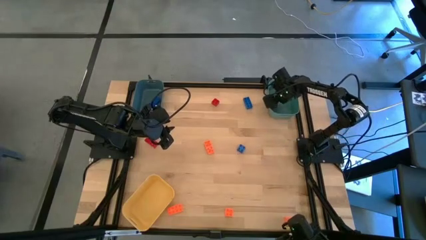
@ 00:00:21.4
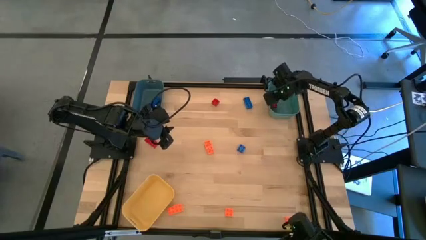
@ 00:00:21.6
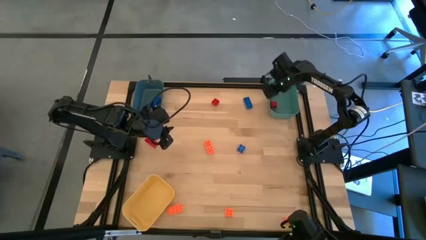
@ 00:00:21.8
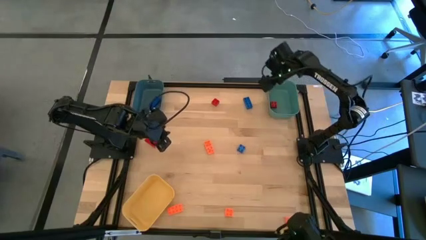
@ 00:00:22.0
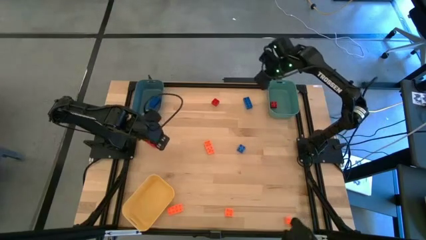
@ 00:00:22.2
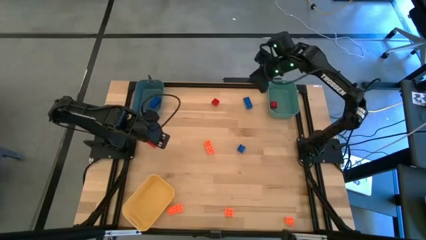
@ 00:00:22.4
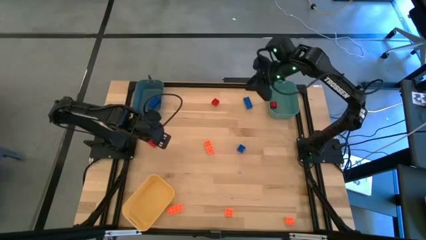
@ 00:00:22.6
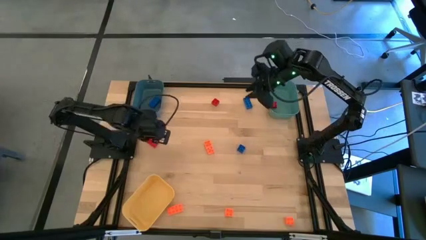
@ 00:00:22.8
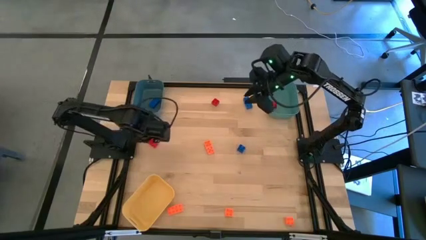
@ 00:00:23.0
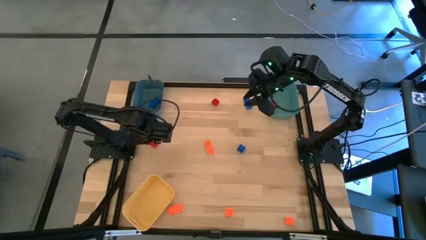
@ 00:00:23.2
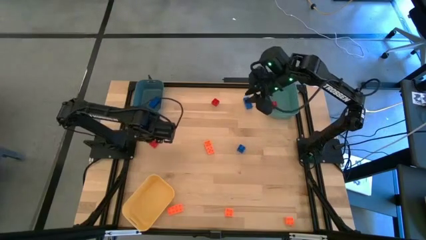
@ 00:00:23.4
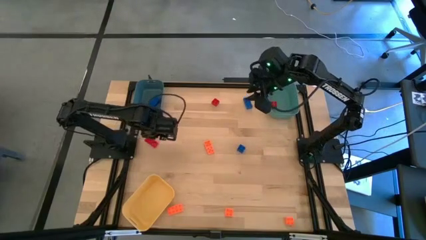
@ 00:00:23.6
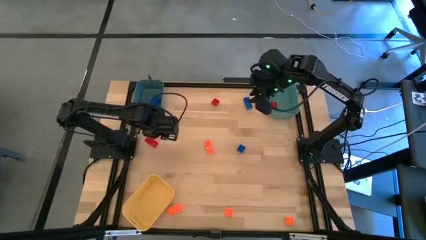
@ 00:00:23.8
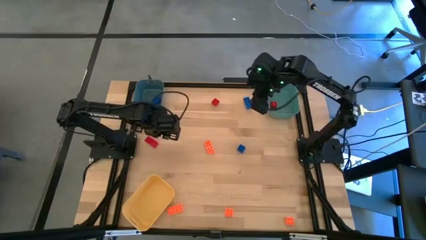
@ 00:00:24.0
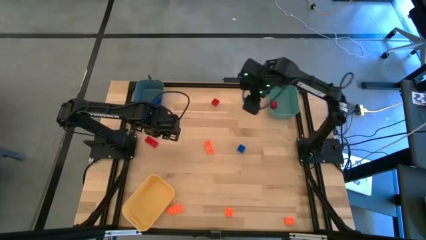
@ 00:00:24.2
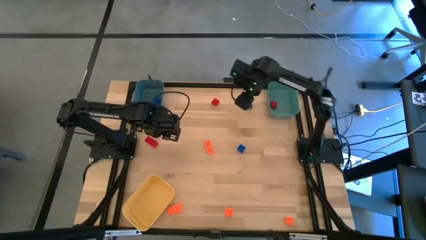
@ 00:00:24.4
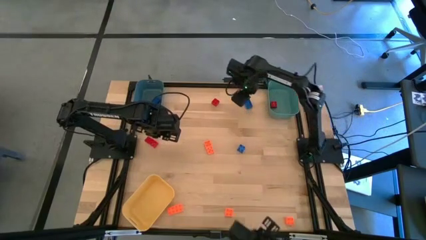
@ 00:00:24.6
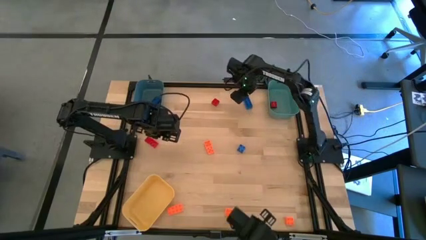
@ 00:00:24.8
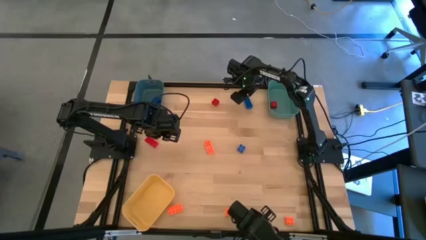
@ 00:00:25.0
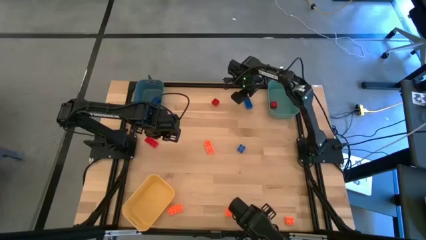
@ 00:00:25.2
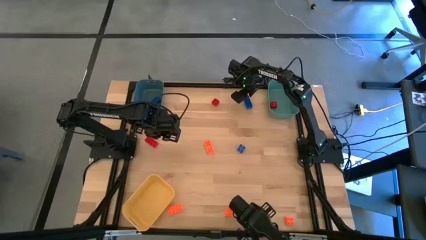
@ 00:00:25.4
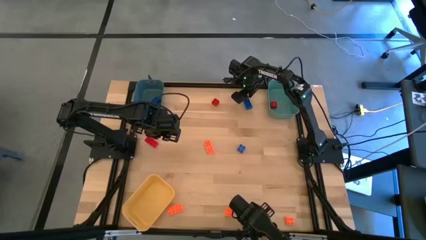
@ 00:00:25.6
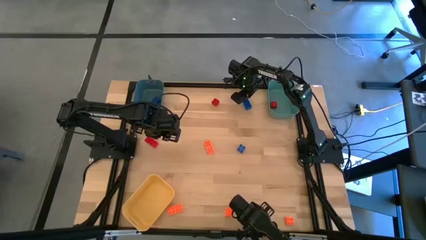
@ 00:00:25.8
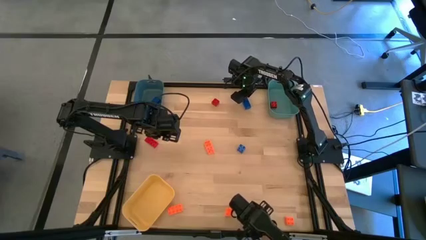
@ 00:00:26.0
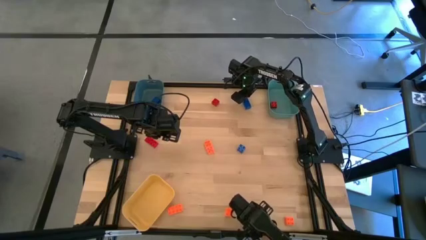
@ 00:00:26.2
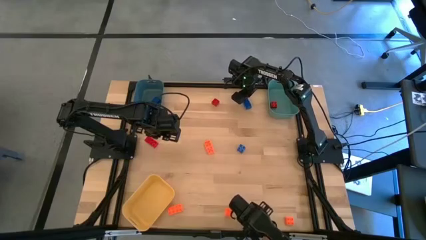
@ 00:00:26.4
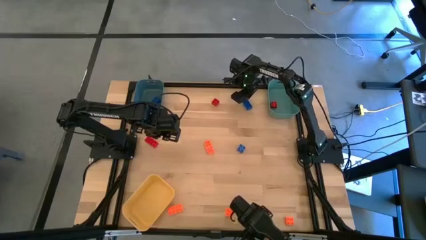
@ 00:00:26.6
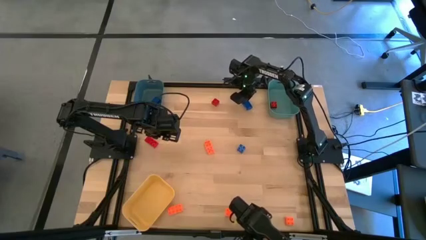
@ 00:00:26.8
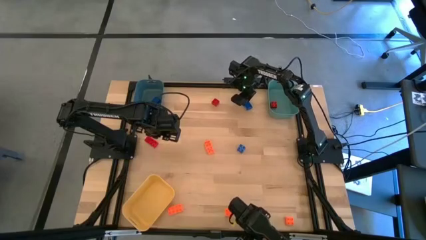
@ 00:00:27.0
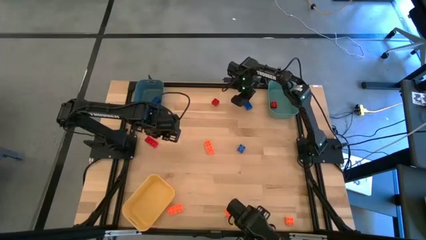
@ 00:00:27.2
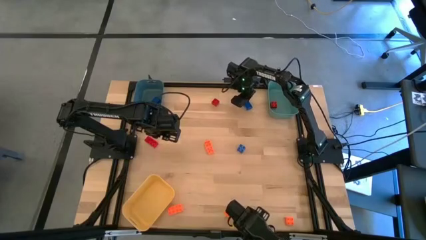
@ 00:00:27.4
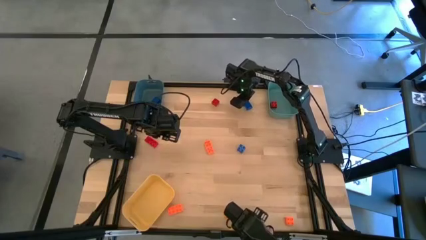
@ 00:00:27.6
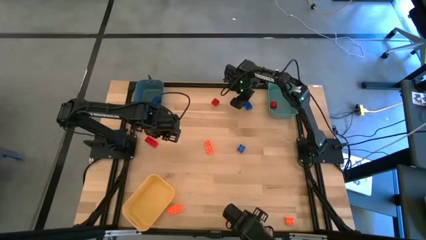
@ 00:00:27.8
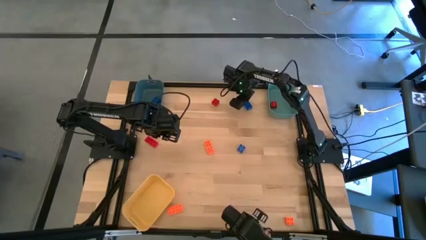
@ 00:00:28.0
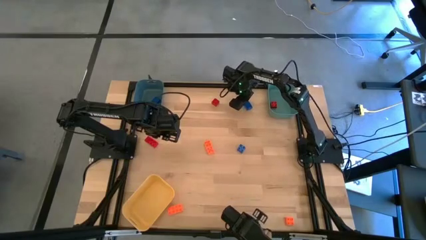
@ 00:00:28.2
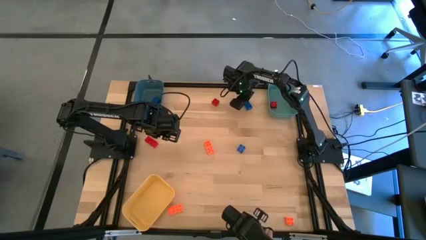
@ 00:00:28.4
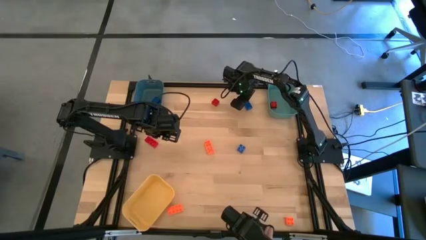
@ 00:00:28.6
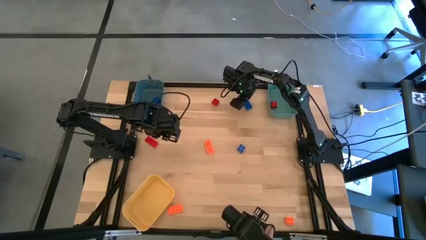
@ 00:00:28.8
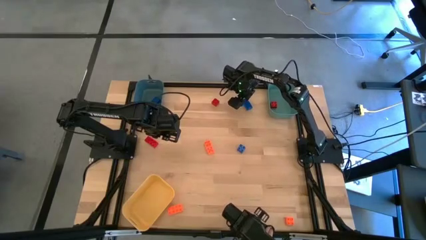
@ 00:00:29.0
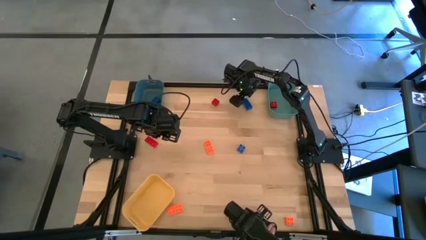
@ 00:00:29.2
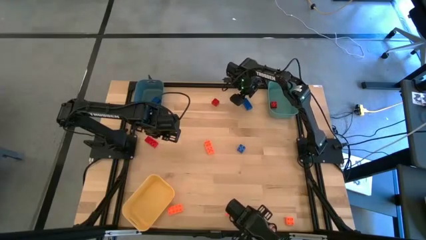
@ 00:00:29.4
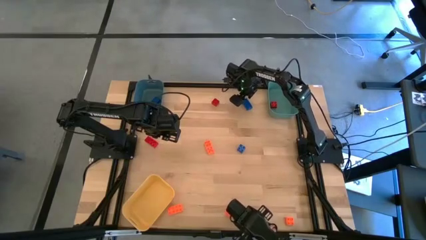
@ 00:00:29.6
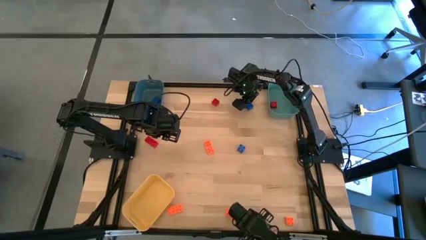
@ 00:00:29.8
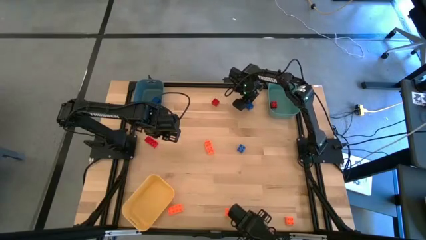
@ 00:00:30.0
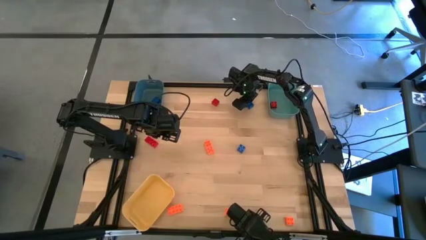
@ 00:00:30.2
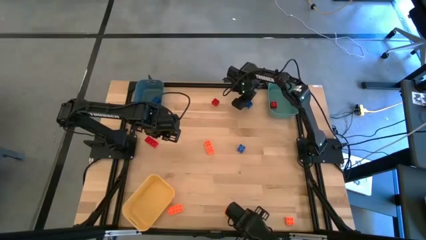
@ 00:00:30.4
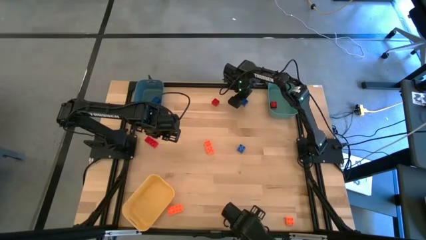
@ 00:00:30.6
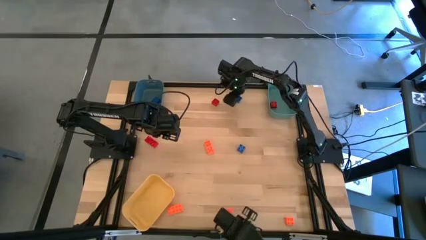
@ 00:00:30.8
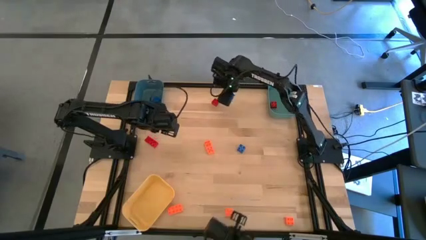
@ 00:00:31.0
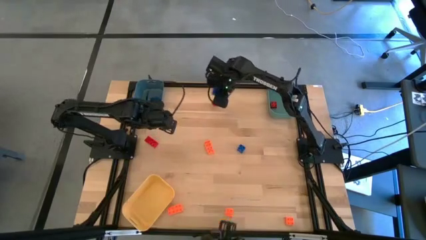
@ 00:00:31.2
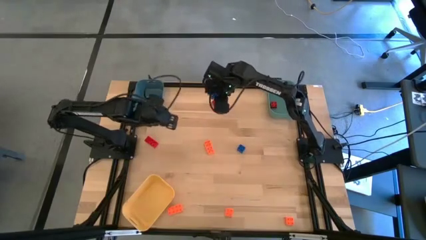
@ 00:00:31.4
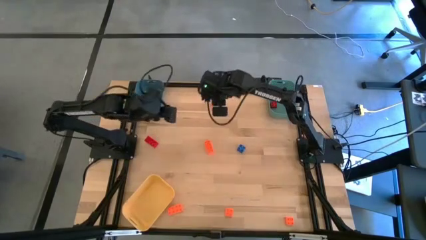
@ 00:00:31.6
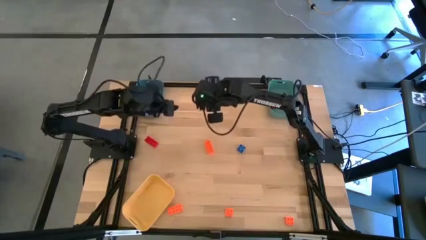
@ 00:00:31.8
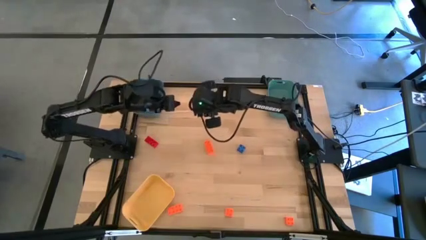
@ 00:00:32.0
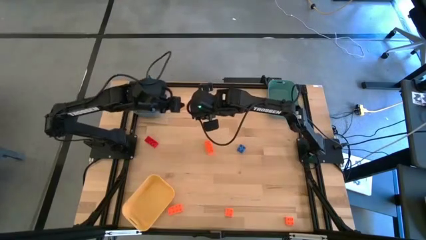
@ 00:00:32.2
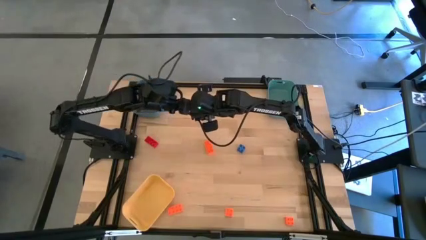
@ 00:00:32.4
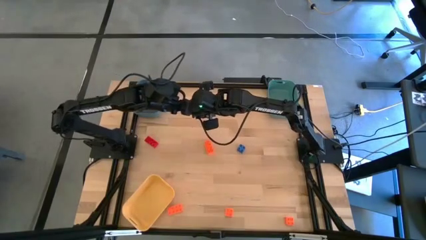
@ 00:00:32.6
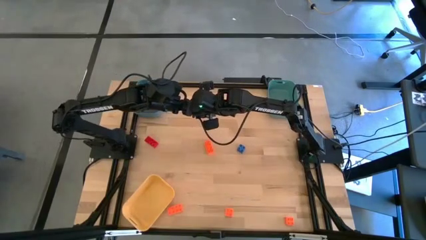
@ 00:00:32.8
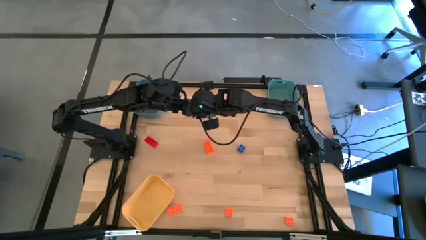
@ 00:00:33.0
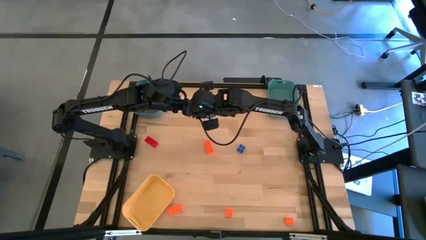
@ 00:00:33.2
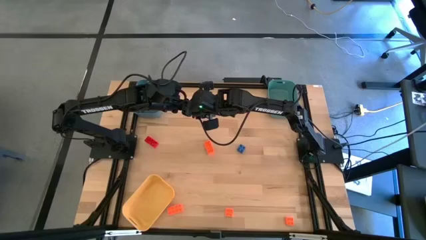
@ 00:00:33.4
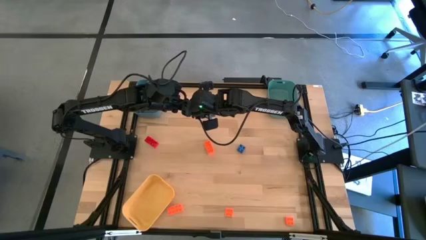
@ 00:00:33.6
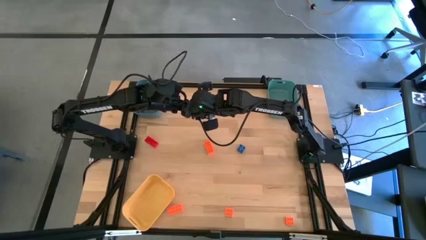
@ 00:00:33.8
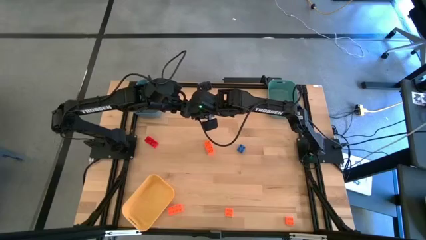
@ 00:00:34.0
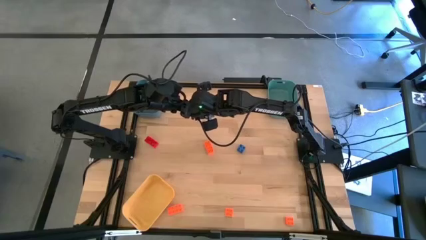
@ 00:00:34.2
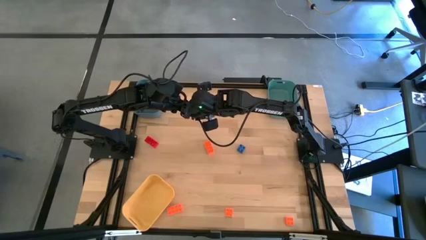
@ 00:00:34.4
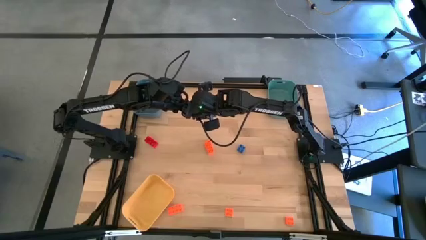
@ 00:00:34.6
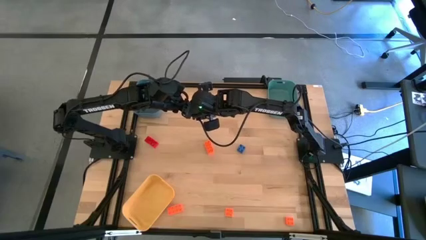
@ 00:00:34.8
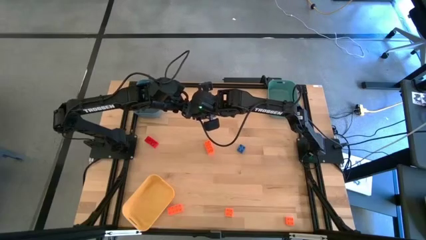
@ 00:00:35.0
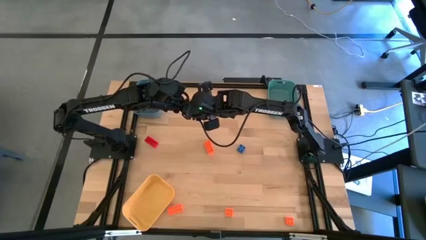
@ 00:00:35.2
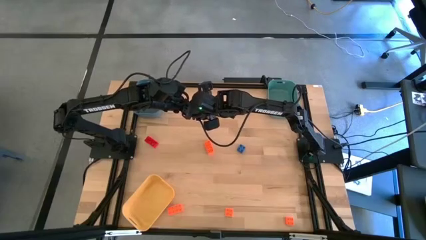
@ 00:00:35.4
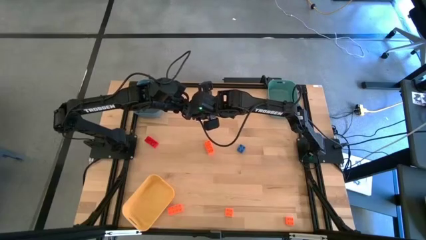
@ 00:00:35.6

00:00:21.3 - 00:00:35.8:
Task: Sort & place blocks by color
Put the top blue game piece into the blue bin
